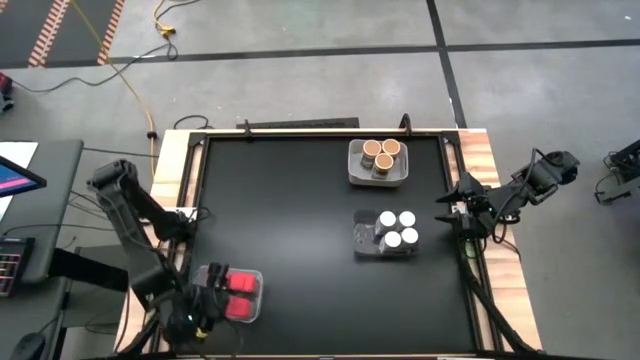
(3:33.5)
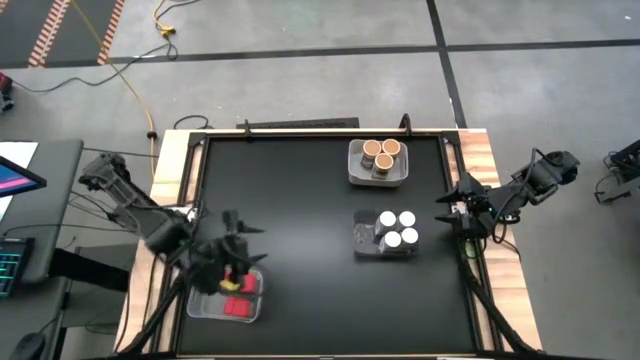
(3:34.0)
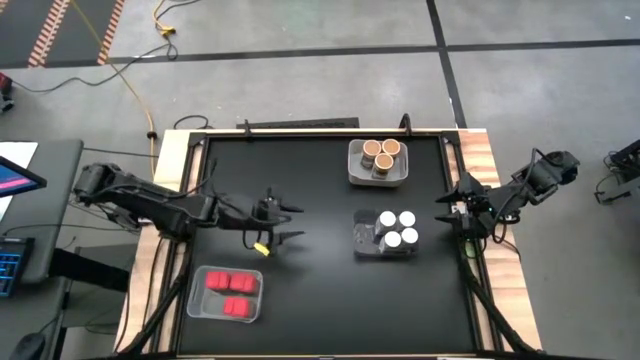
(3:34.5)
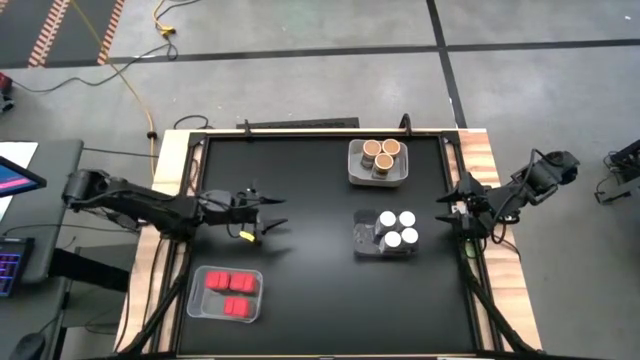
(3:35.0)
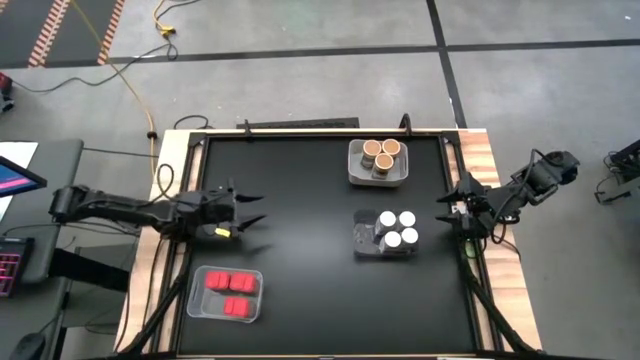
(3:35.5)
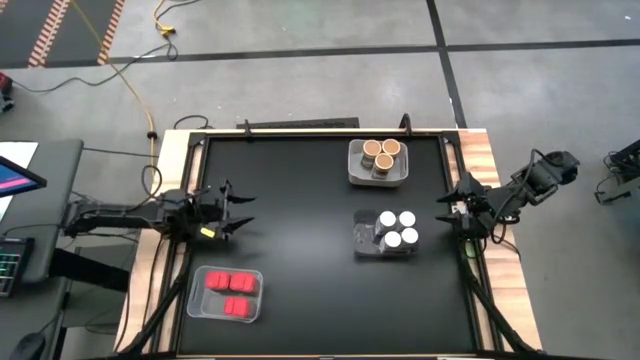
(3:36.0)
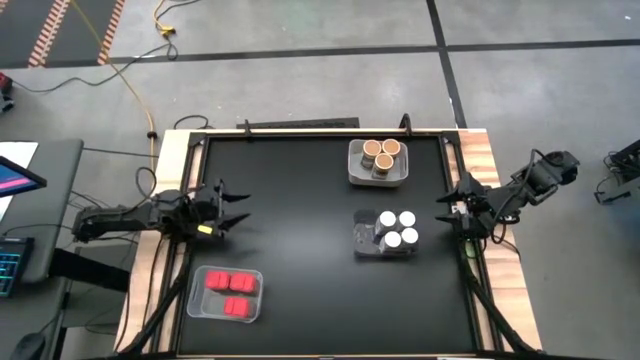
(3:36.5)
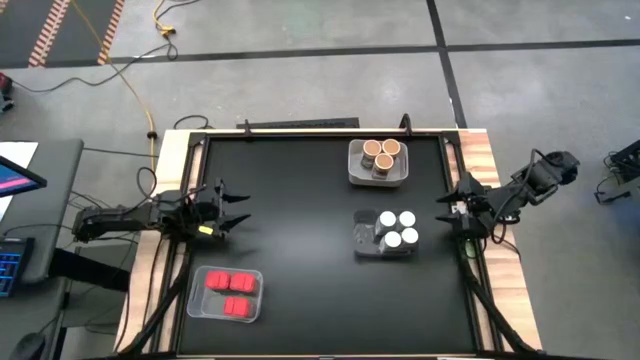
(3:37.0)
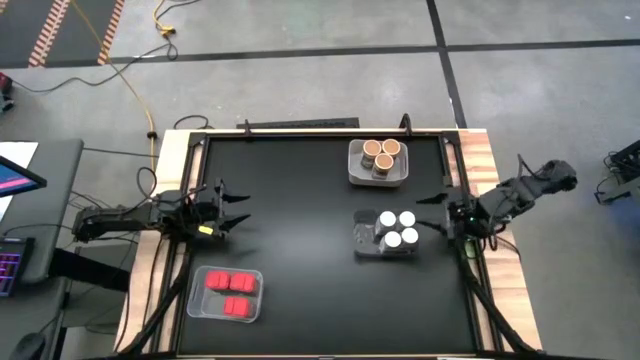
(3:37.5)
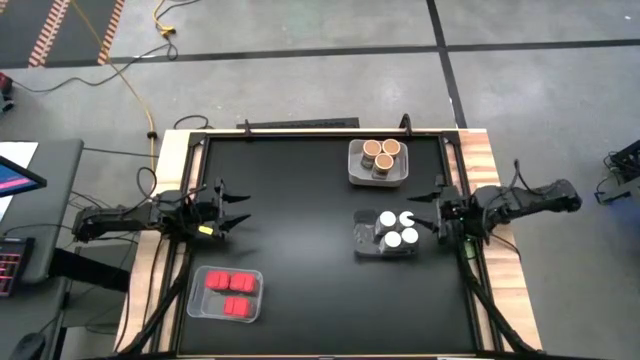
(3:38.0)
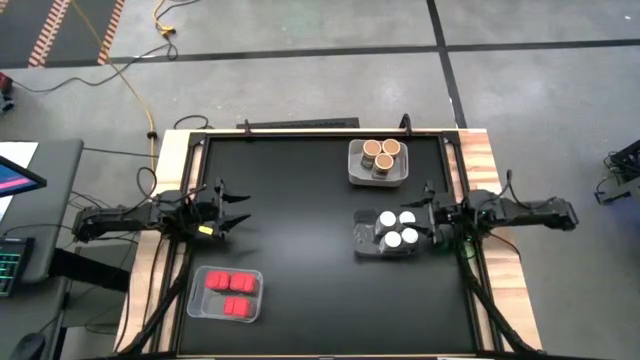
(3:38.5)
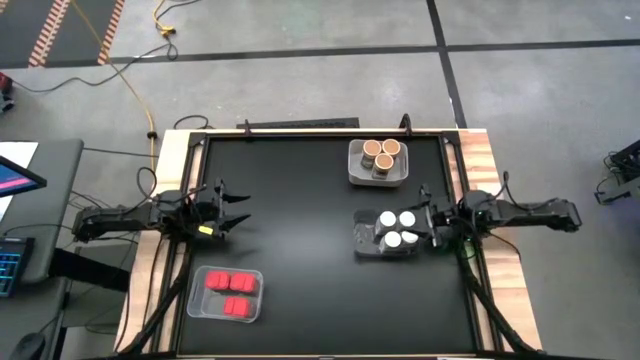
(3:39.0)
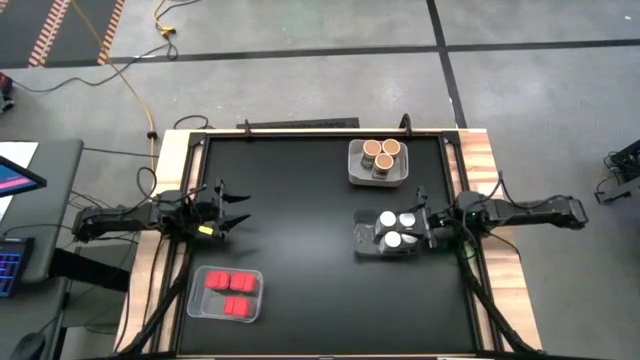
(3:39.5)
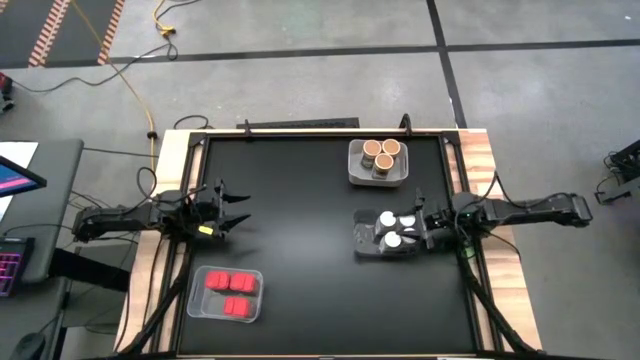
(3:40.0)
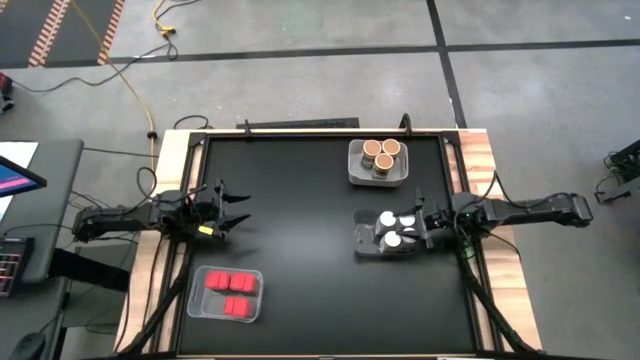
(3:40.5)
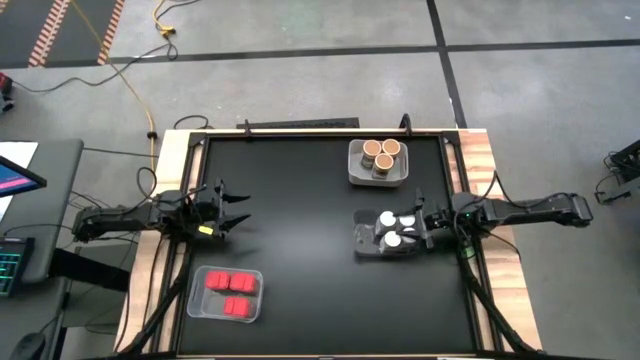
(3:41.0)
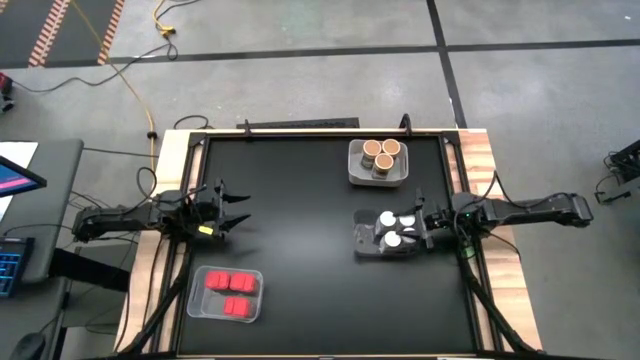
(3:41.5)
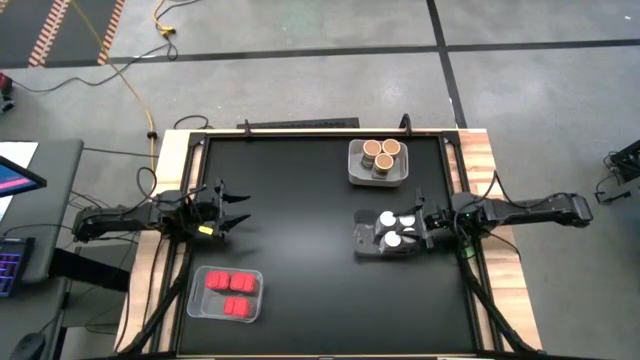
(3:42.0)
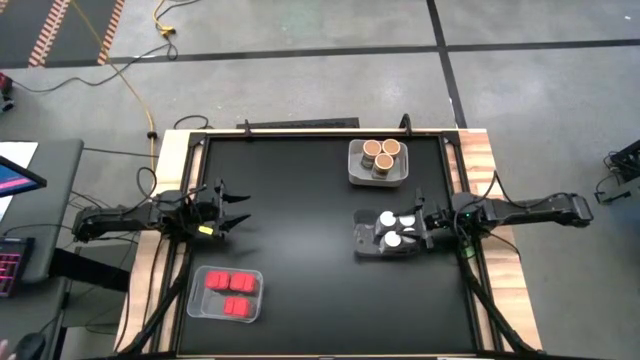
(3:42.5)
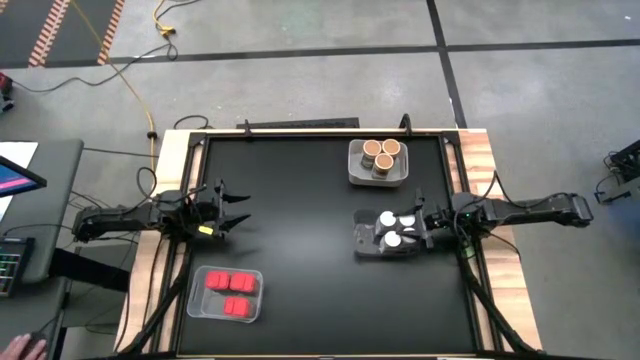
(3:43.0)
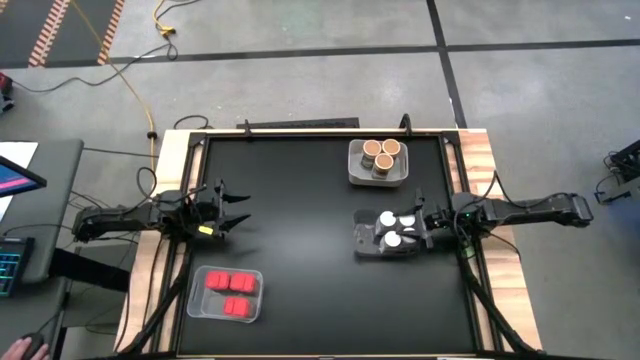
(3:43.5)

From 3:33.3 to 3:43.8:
Task: Sort spices by type
Return to Home Position

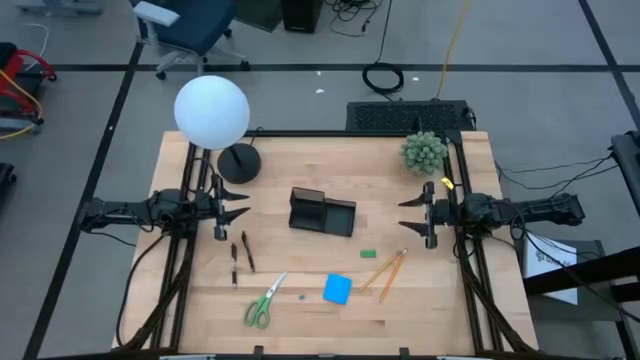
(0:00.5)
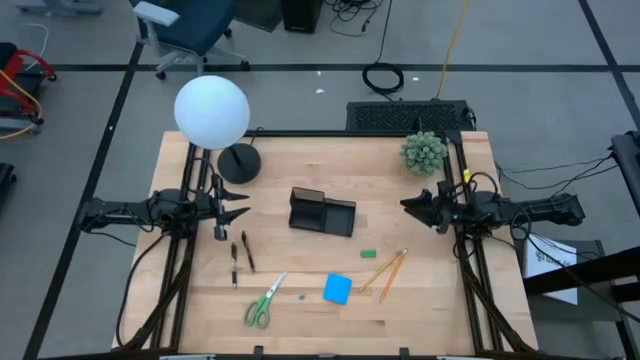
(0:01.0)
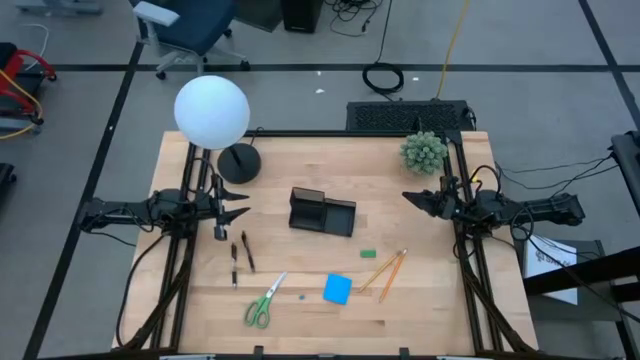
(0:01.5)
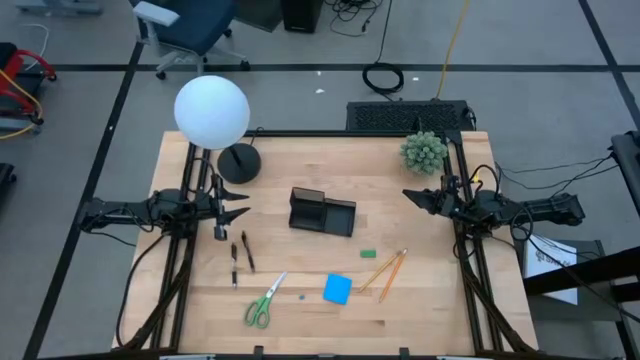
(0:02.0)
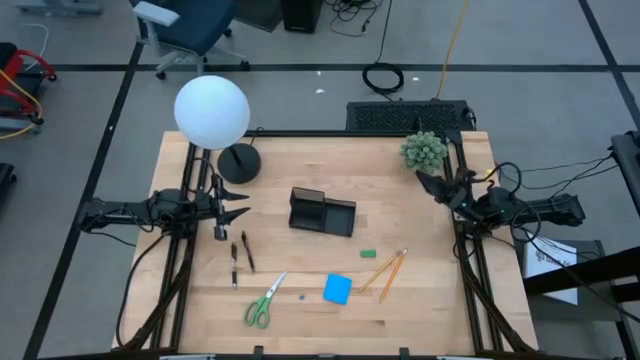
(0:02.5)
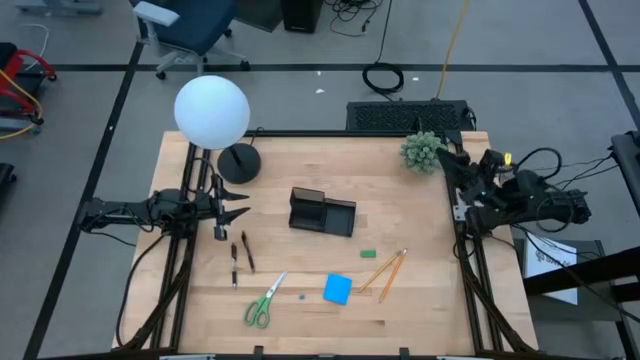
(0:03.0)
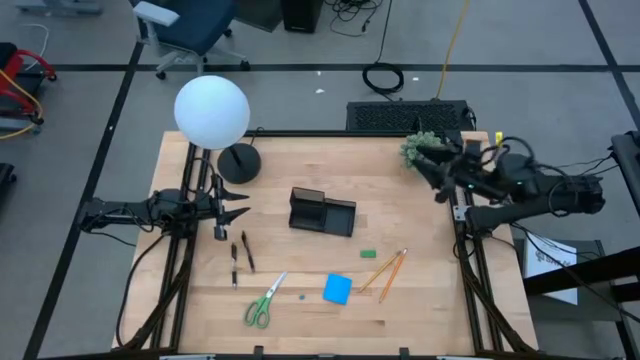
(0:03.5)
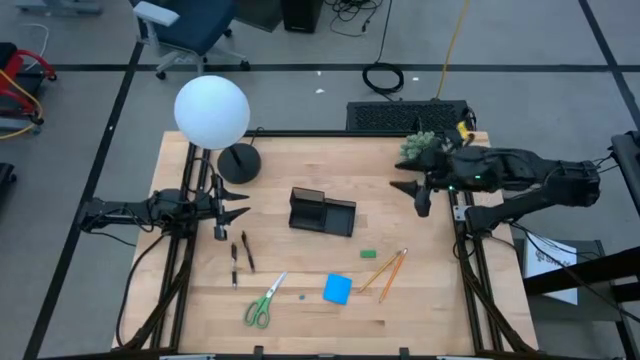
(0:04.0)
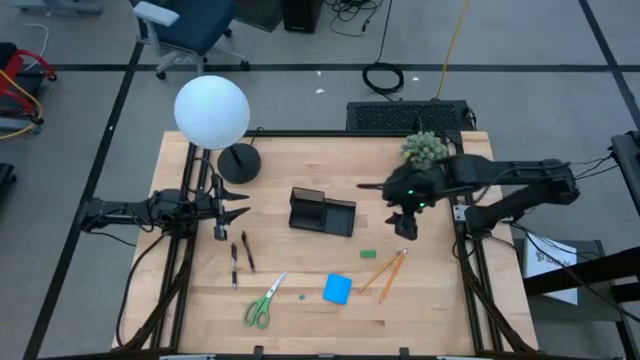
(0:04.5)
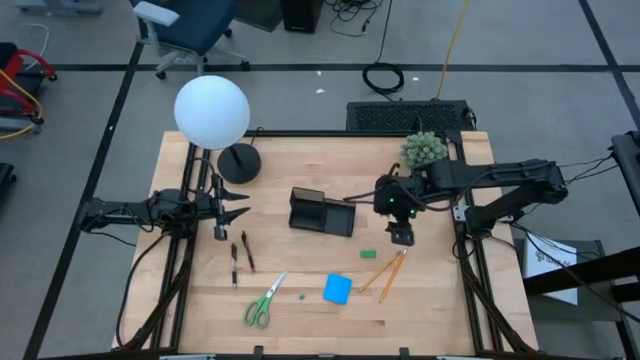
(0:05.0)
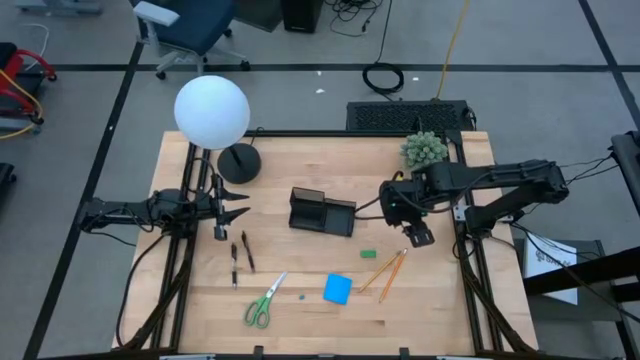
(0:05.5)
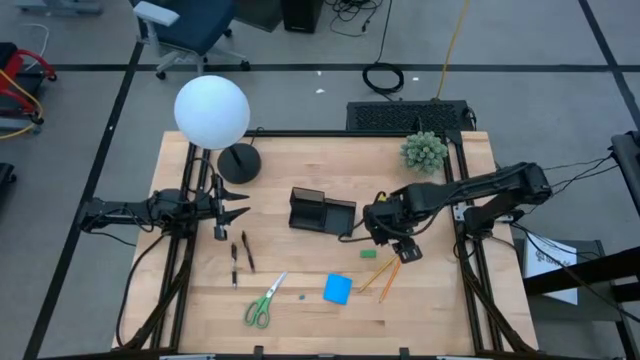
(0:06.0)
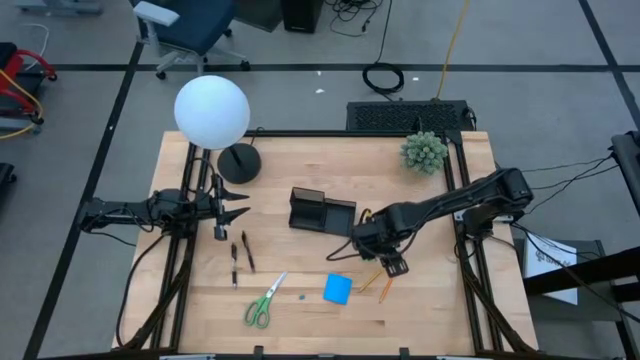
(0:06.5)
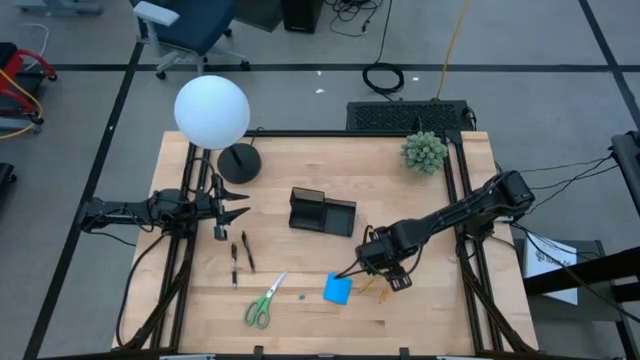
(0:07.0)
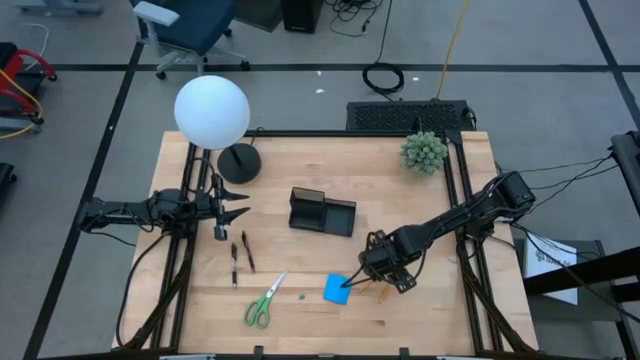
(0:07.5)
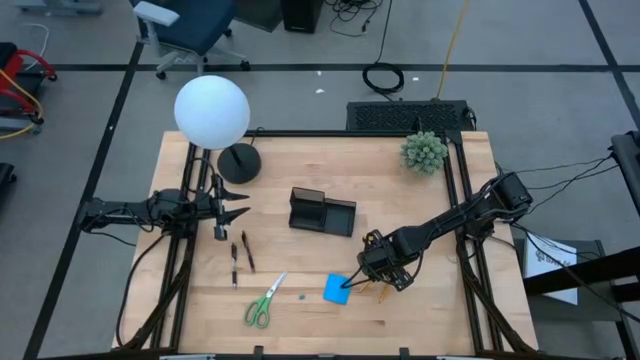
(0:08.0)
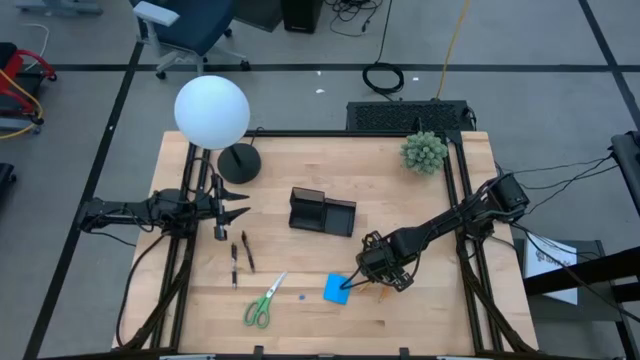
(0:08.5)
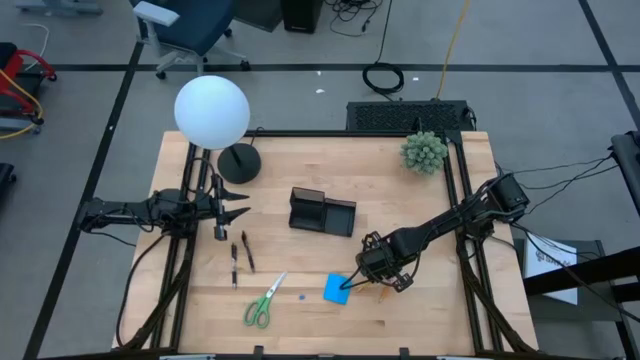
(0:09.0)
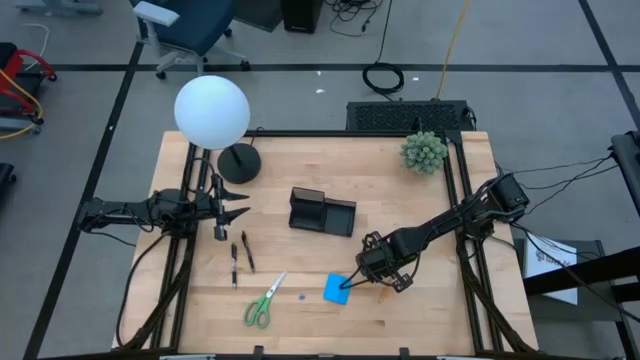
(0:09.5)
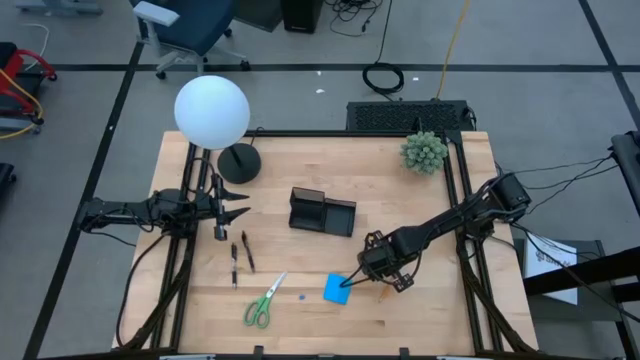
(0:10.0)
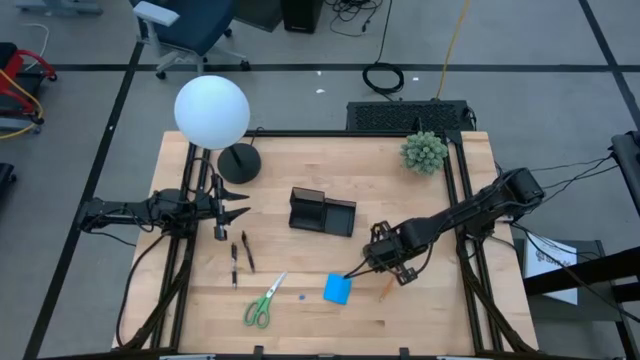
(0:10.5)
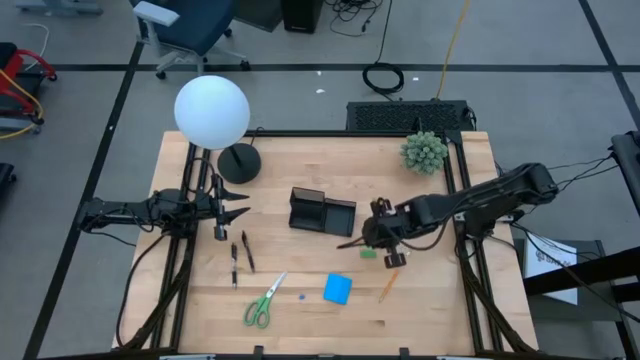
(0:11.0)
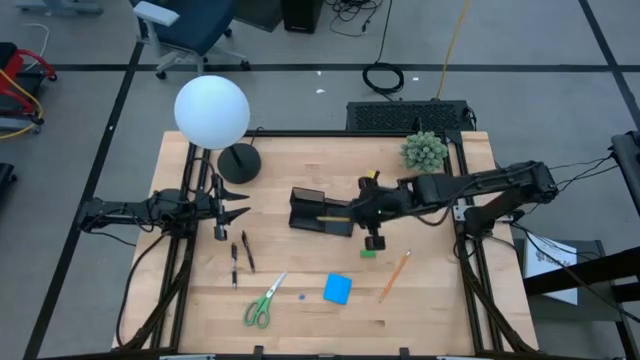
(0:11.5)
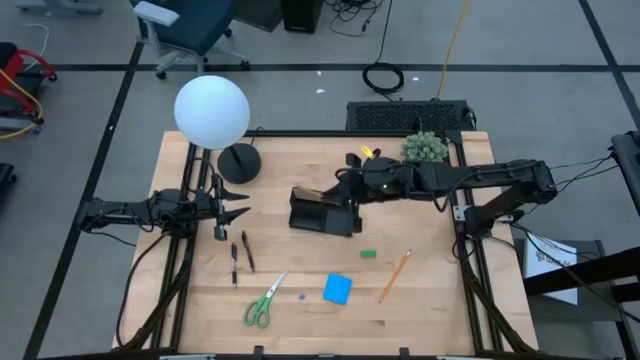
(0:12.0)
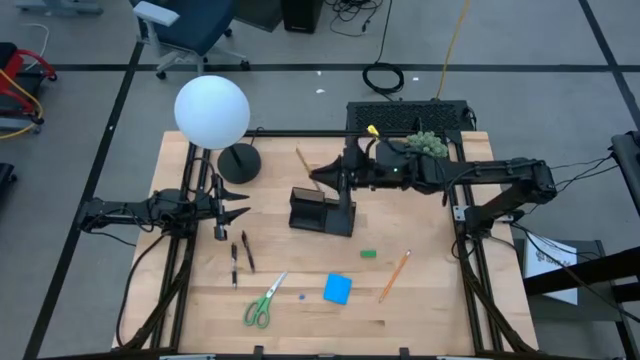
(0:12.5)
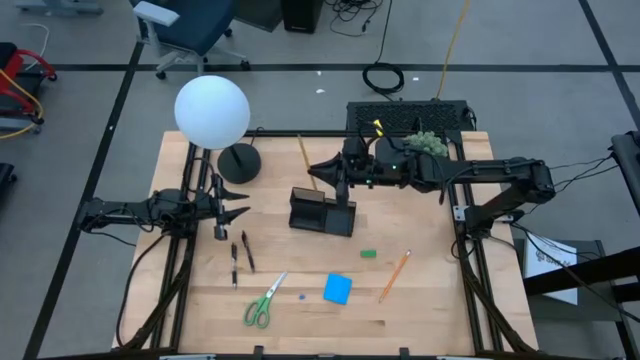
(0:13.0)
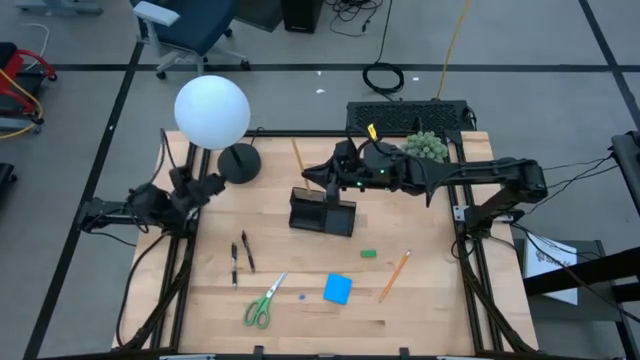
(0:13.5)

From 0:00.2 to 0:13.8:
Task: Pick and place office supplies into organizer
Put the yellow pencil into the desk organizer
